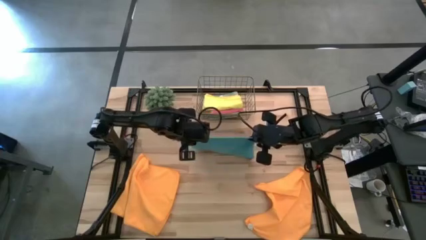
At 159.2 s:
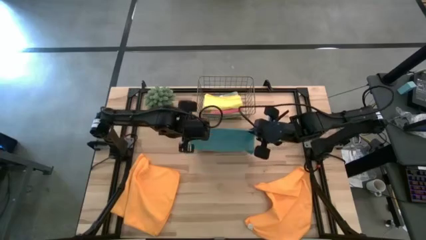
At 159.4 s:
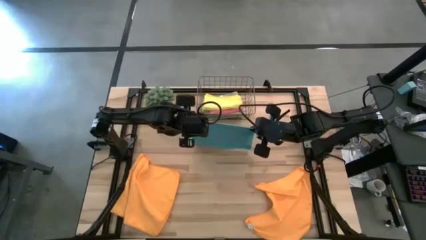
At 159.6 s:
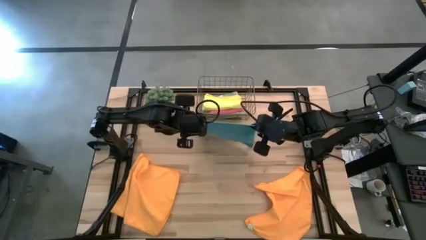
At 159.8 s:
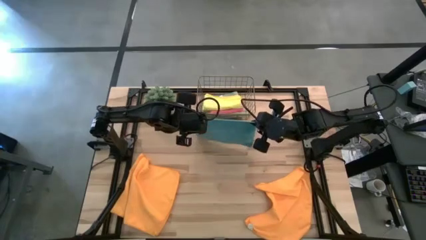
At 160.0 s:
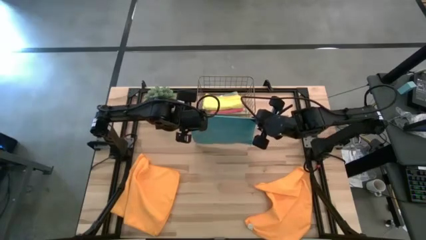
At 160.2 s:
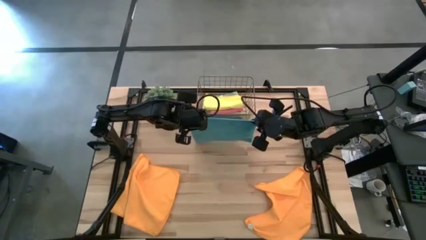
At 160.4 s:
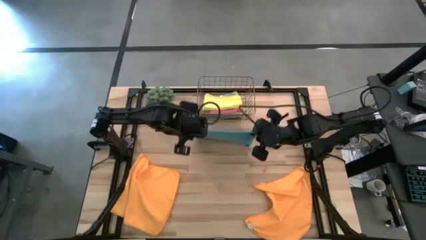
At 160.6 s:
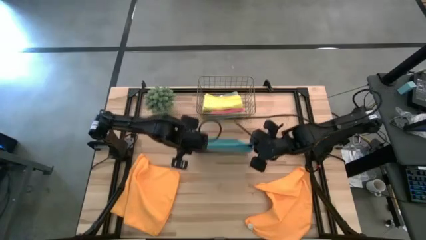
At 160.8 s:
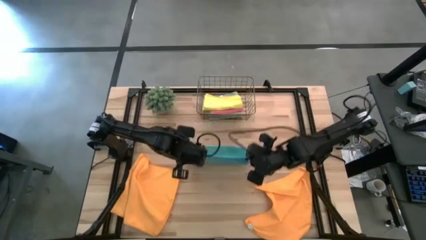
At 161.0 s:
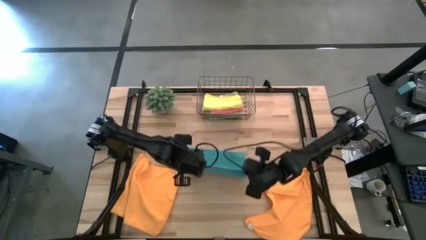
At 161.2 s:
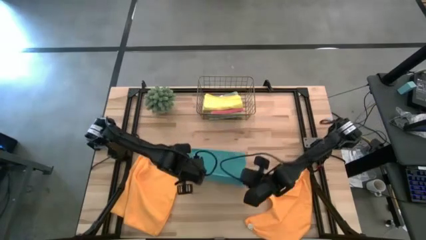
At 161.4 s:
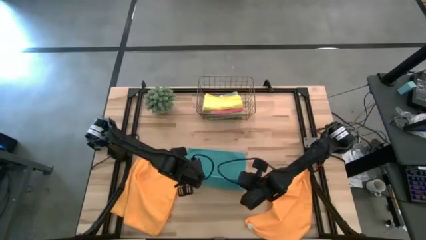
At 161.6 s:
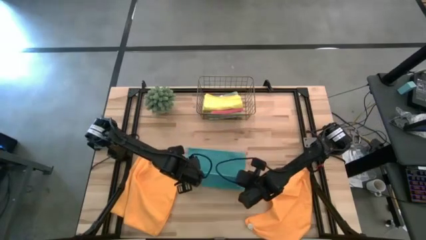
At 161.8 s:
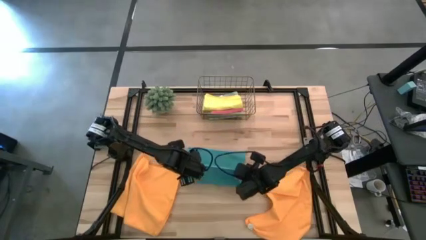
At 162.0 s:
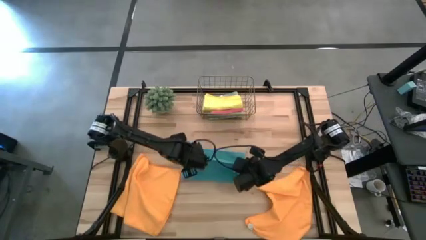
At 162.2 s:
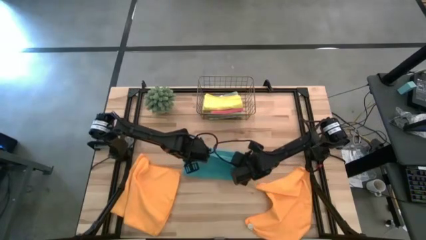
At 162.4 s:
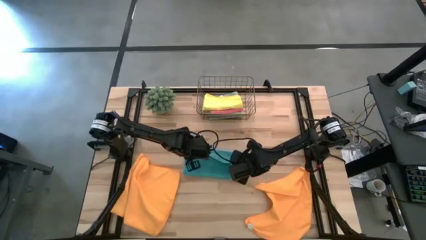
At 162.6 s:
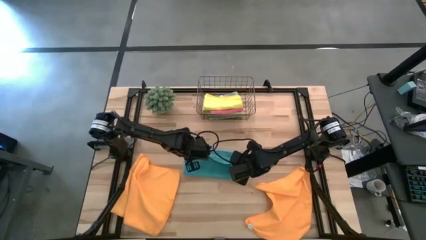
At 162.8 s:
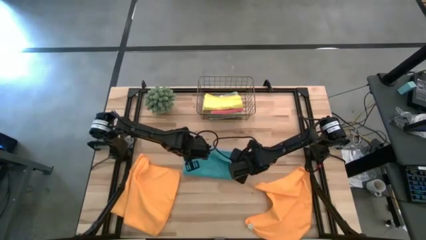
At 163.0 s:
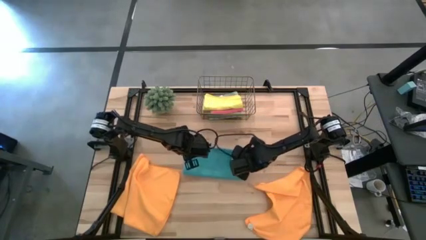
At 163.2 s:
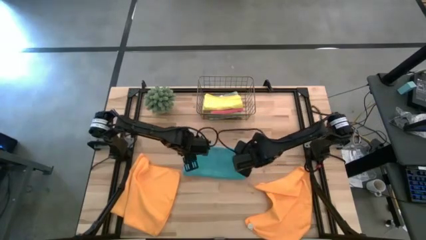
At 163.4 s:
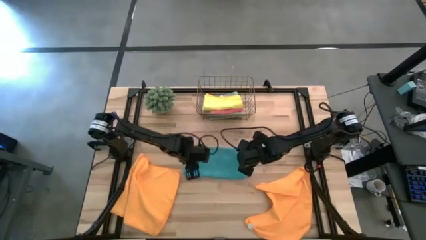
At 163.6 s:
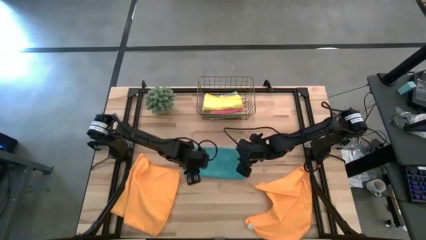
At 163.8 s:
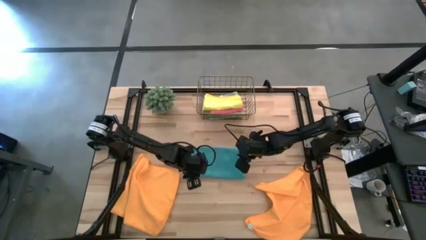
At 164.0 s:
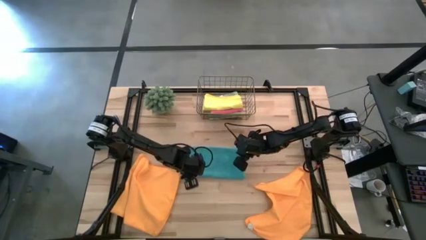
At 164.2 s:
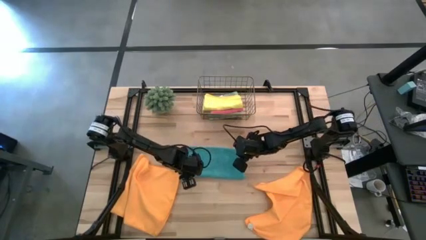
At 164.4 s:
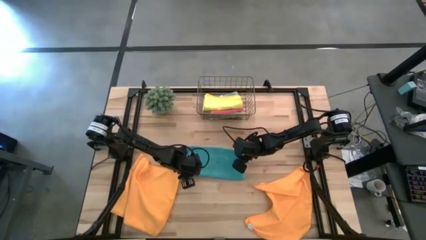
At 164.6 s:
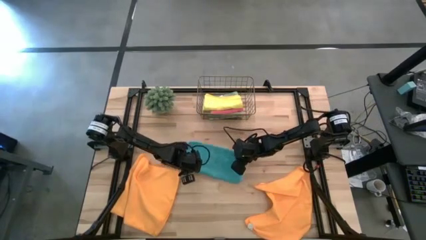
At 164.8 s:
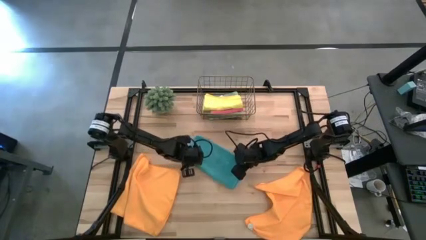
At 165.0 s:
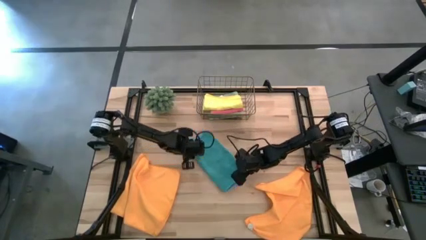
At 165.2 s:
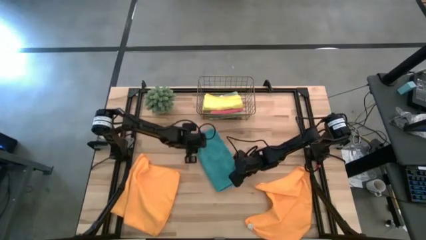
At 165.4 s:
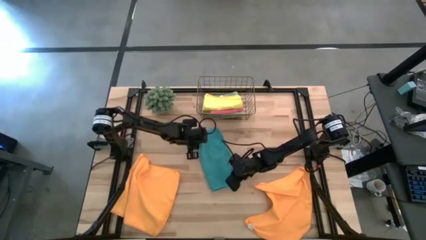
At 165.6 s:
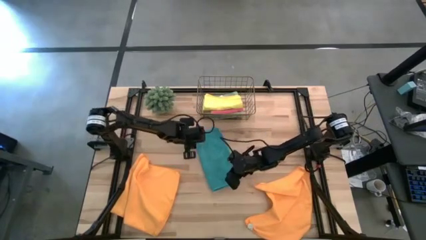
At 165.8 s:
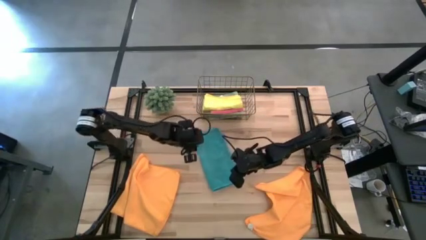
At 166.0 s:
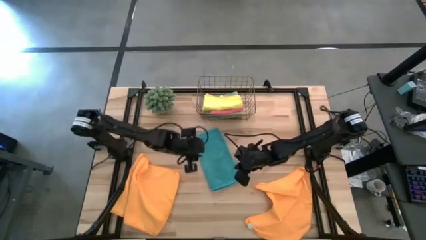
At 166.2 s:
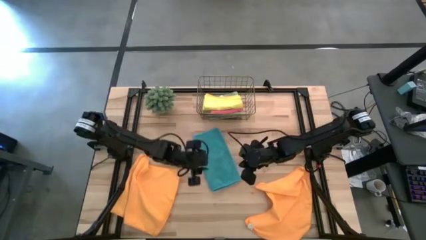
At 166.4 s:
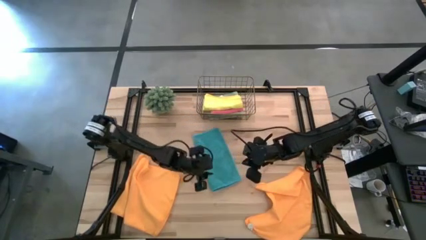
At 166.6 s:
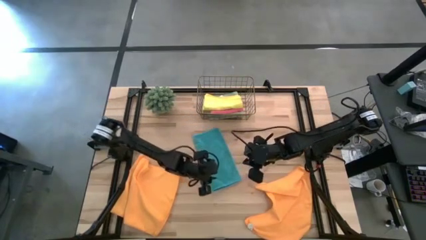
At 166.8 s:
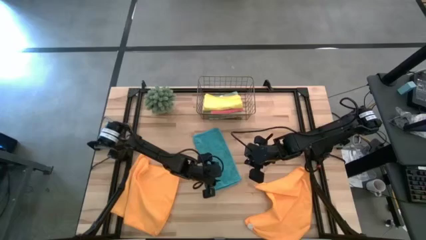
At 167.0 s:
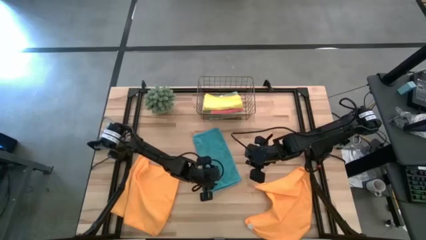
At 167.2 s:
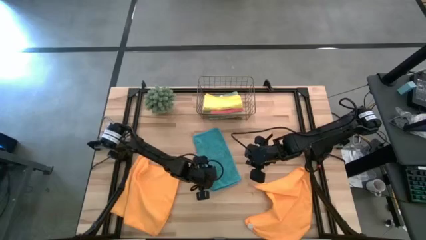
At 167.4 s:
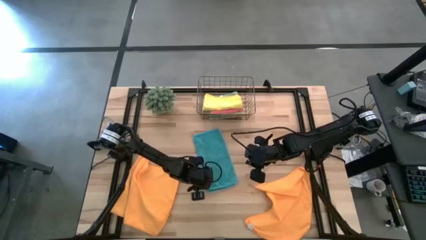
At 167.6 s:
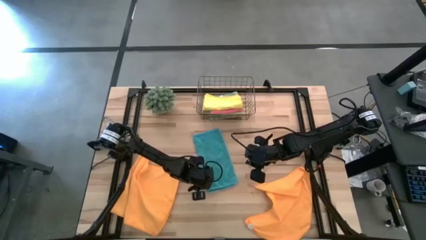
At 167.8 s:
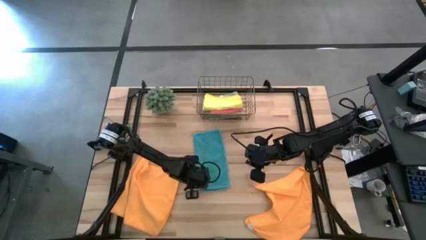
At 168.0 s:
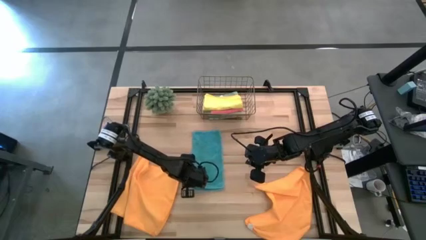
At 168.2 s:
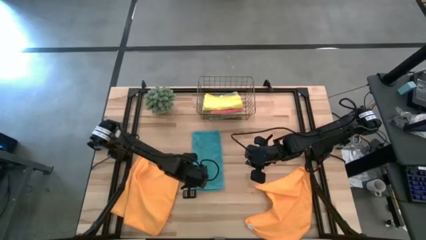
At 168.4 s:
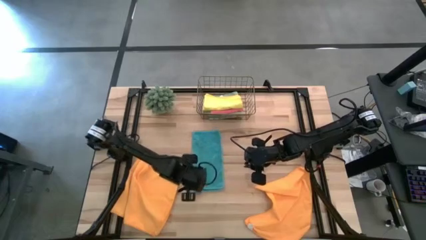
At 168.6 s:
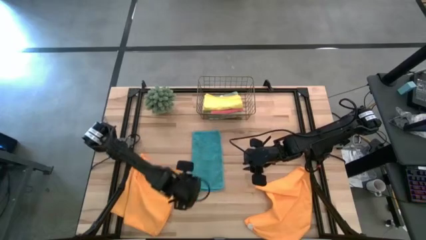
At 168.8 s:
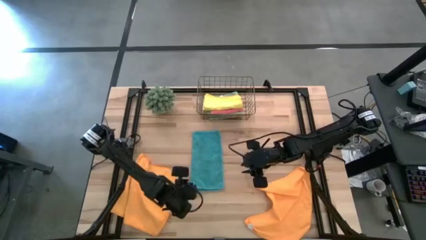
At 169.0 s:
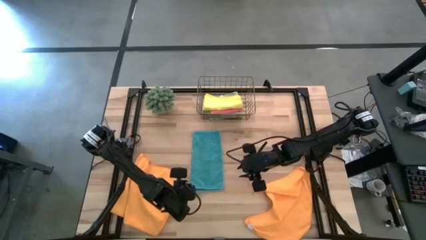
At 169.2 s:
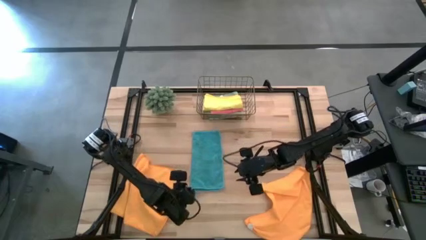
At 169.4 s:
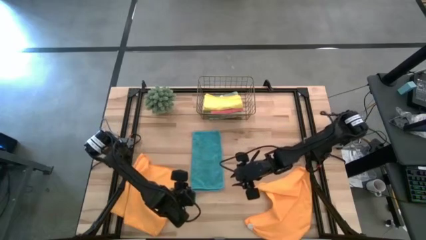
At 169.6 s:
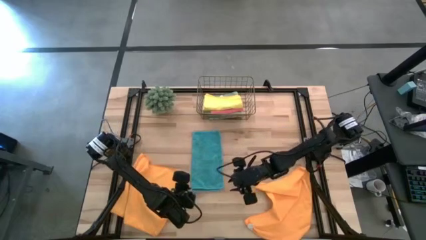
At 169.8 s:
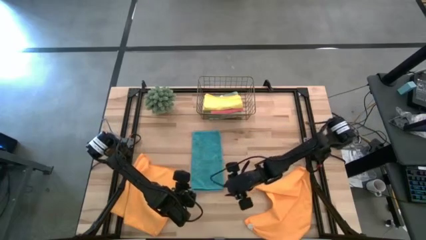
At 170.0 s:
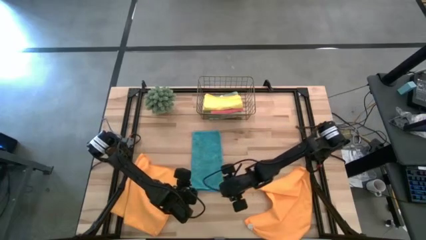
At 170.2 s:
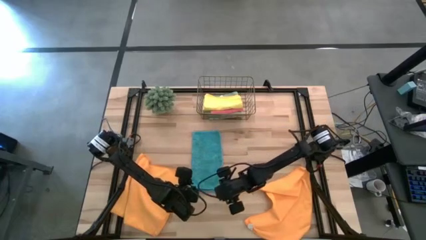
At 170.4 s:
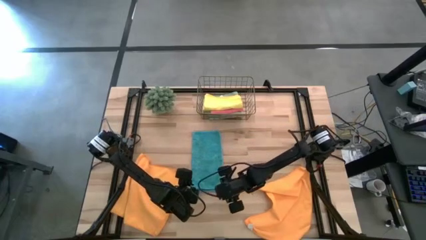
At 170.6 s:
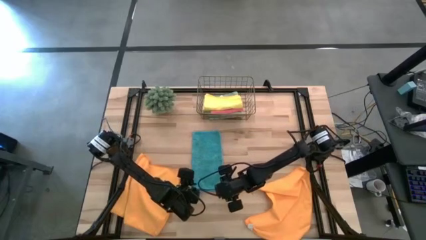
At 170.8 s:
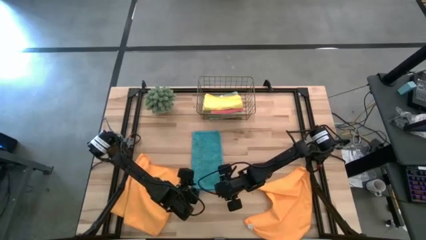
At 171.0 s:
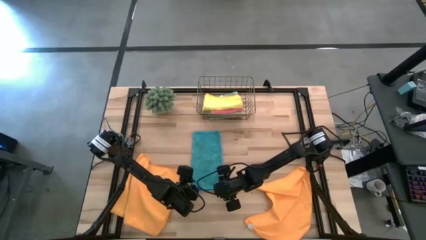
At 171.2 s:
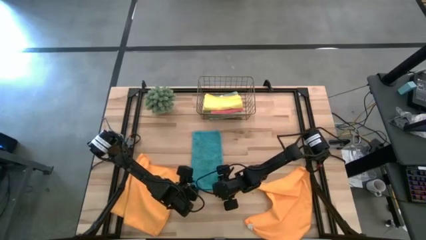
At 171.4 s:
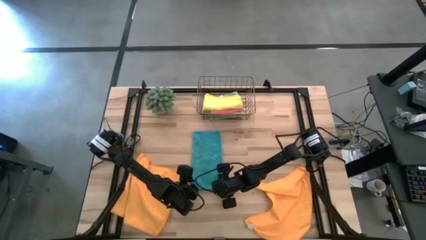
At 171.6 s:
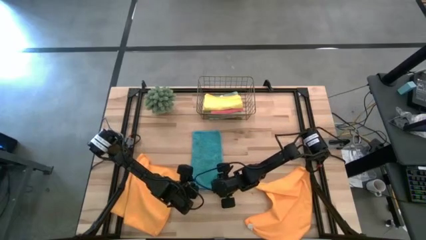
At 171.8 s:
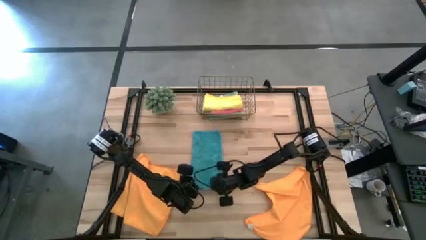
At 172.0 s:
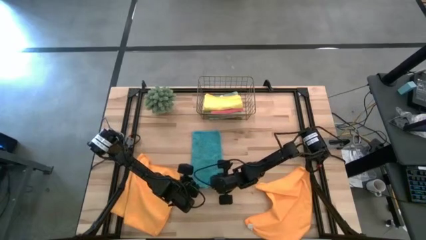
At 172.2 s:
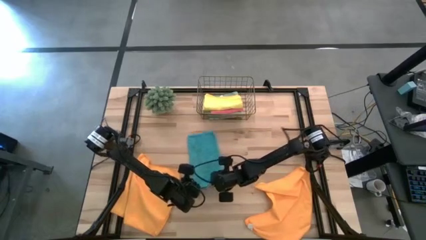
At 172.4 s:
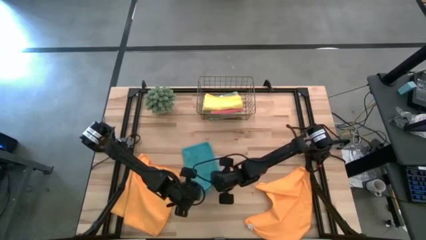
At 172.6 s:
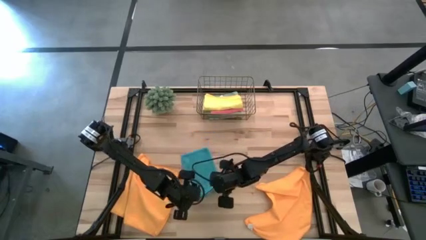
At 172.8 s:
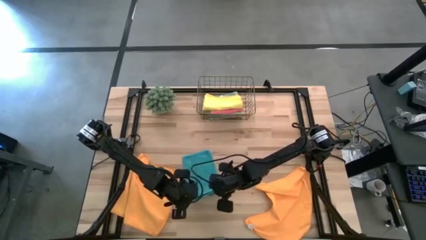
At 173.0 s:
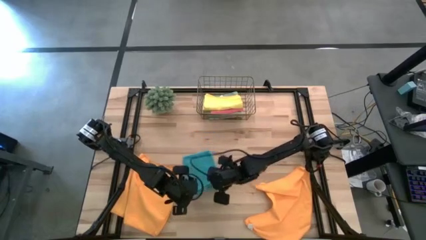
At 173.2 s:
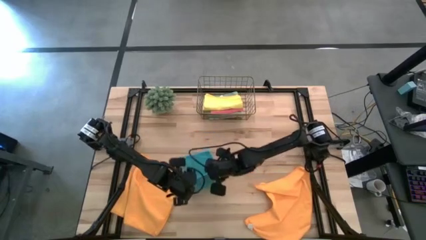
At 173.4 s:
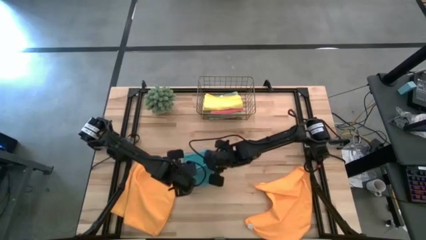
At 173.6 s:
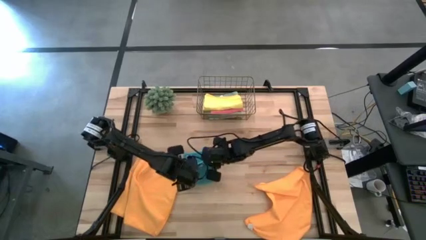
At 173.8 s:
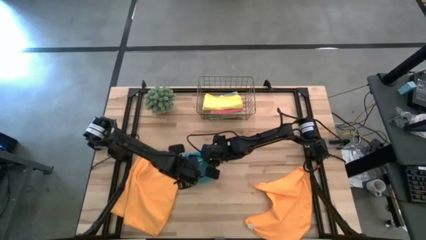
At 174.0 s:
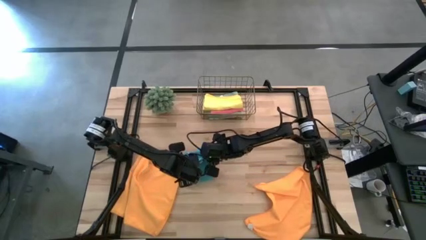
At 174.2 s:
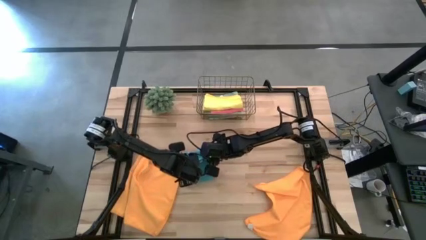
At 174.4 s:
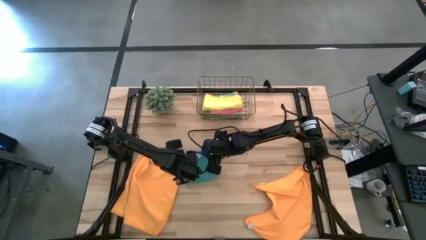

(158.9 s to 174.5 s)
Task: Fold microfiber towels
Fold the blue towel
